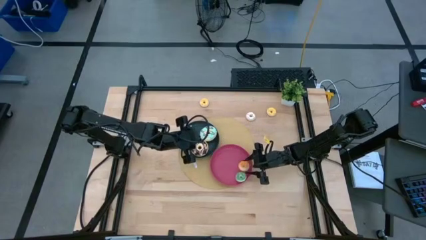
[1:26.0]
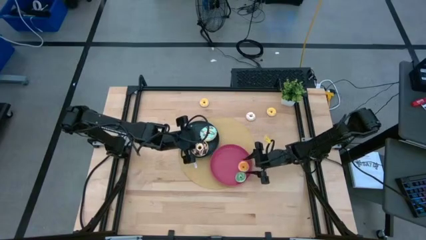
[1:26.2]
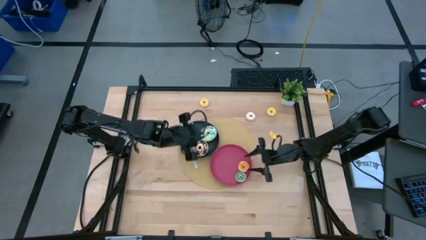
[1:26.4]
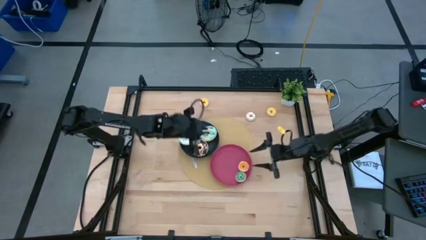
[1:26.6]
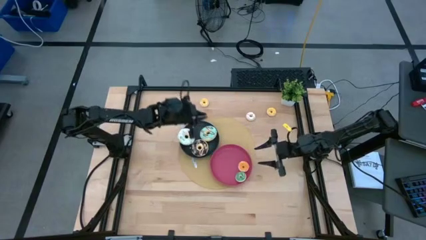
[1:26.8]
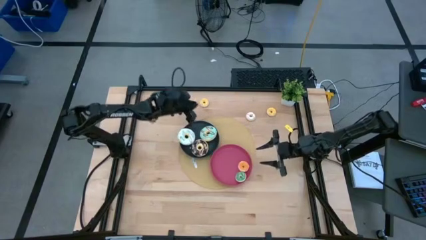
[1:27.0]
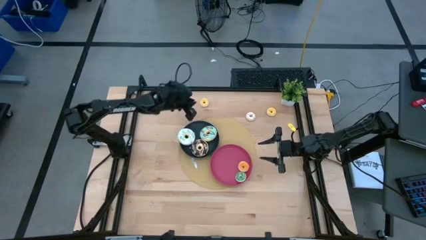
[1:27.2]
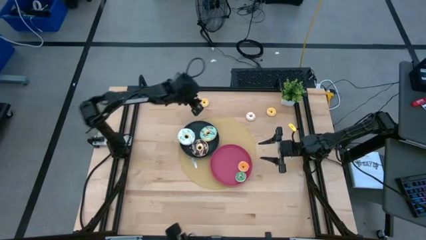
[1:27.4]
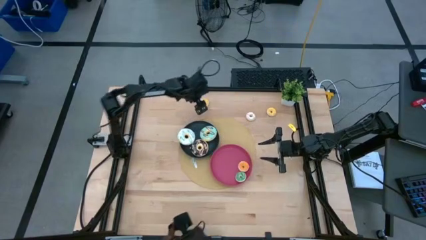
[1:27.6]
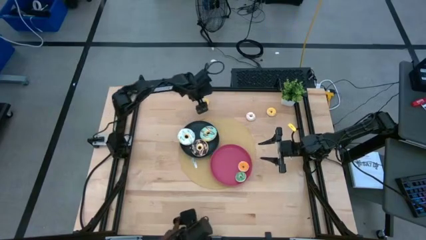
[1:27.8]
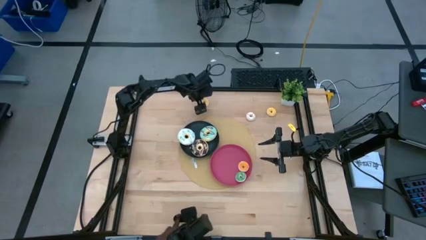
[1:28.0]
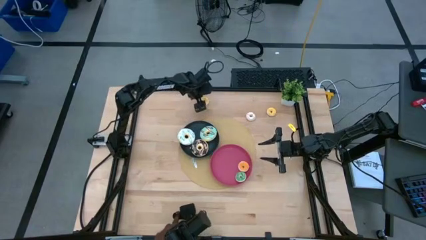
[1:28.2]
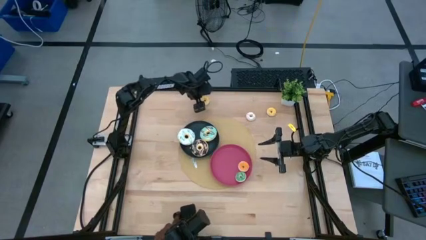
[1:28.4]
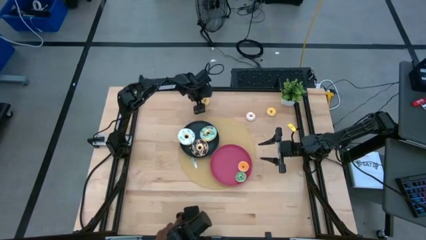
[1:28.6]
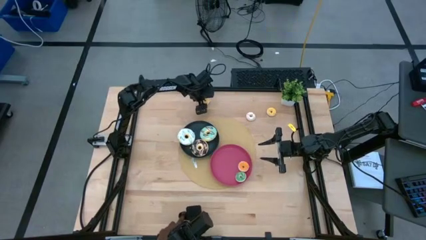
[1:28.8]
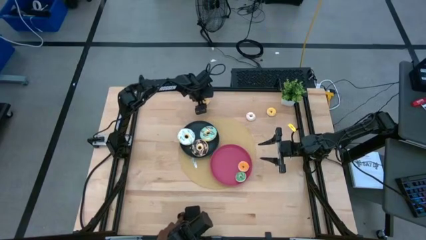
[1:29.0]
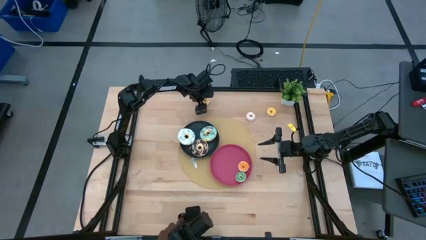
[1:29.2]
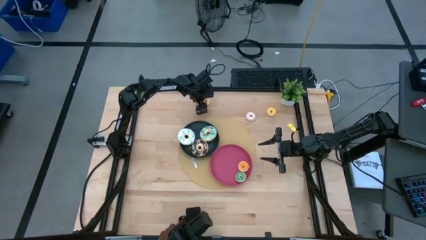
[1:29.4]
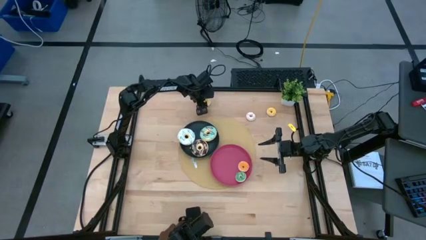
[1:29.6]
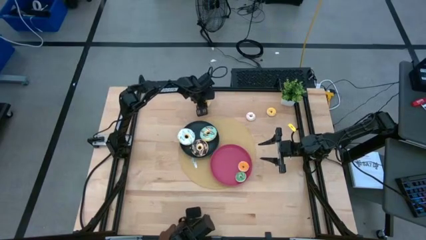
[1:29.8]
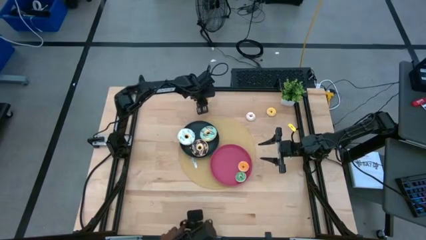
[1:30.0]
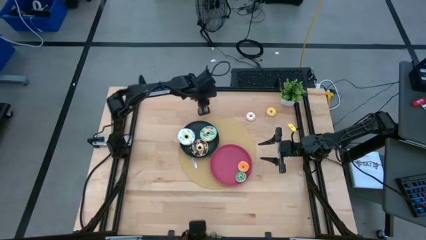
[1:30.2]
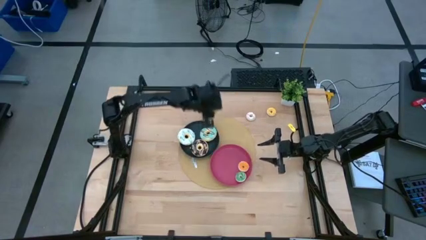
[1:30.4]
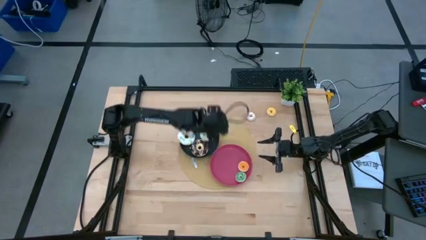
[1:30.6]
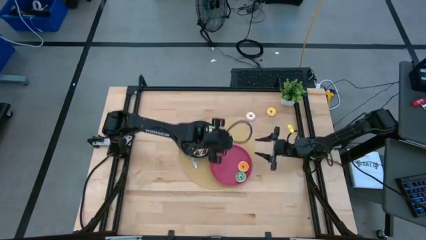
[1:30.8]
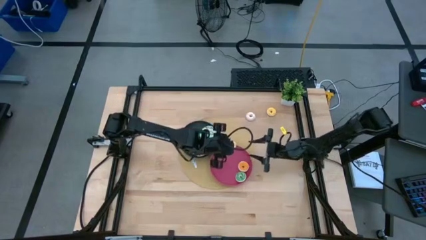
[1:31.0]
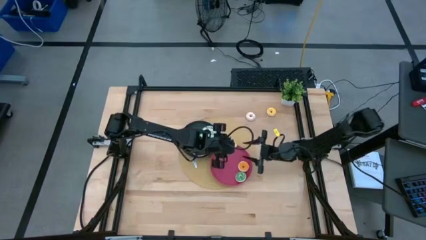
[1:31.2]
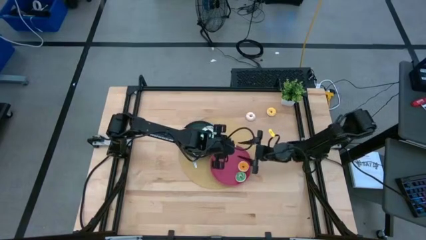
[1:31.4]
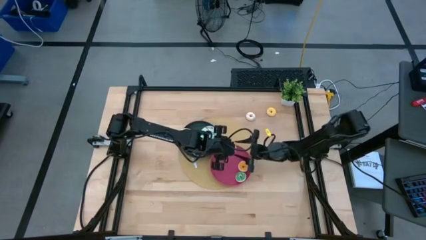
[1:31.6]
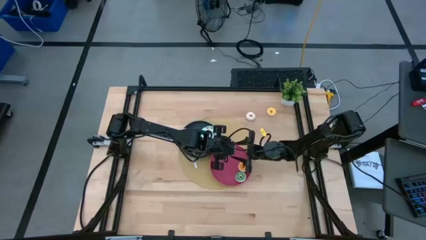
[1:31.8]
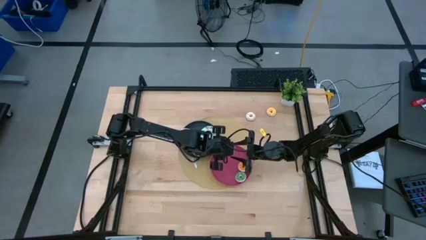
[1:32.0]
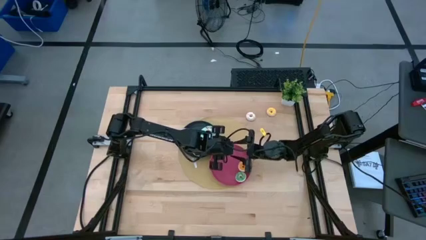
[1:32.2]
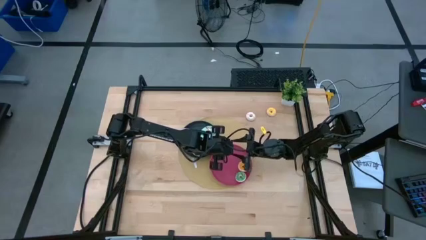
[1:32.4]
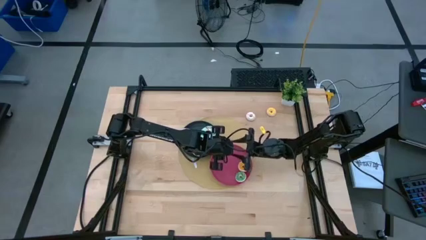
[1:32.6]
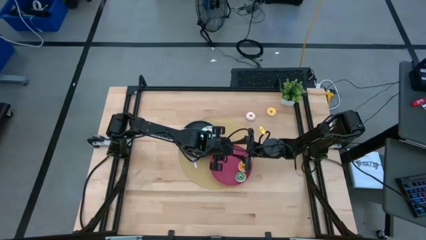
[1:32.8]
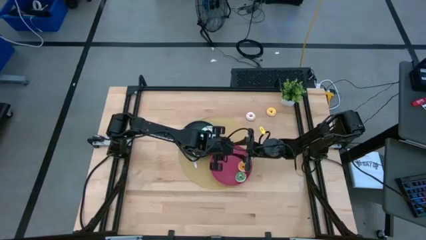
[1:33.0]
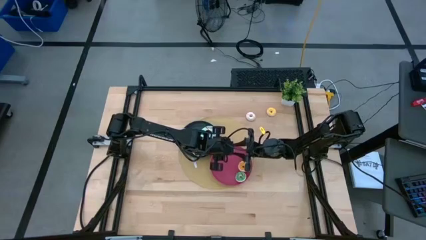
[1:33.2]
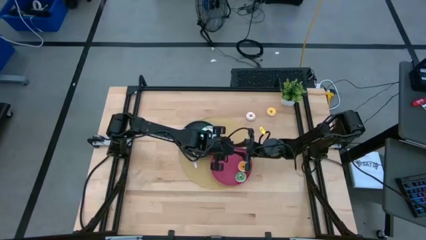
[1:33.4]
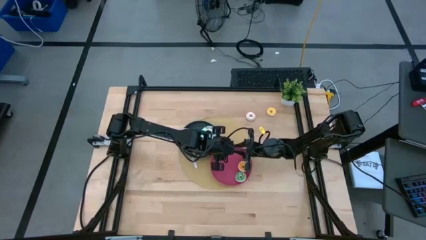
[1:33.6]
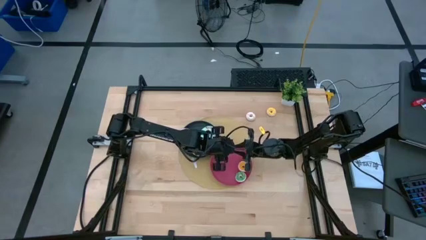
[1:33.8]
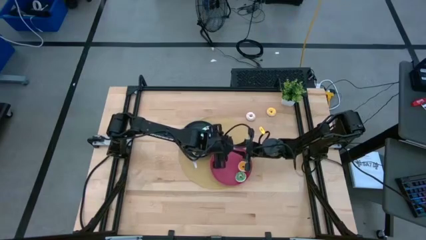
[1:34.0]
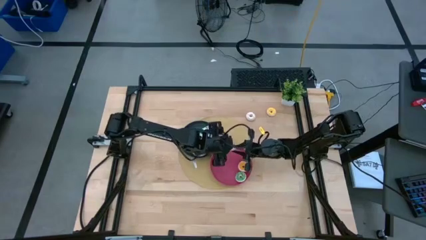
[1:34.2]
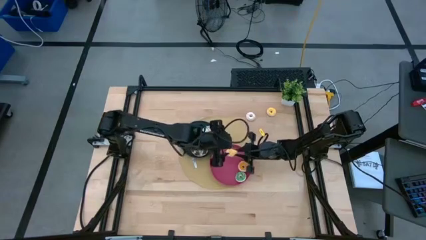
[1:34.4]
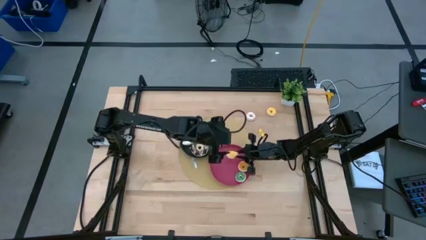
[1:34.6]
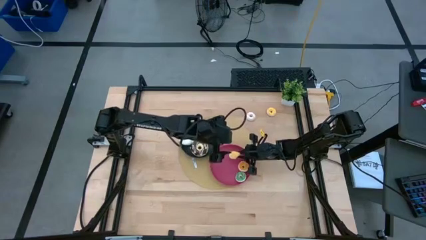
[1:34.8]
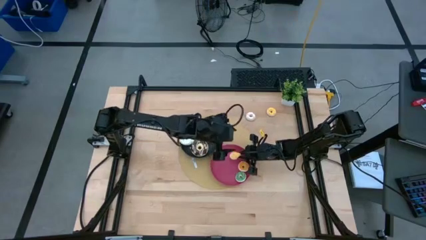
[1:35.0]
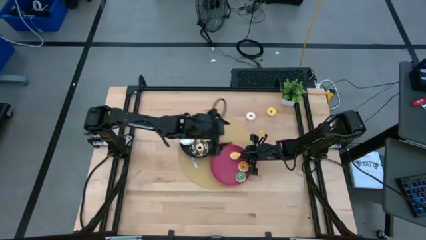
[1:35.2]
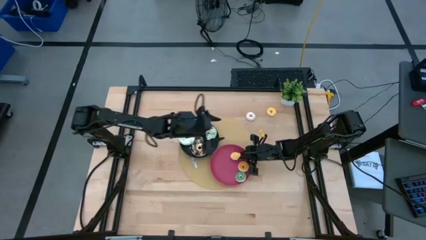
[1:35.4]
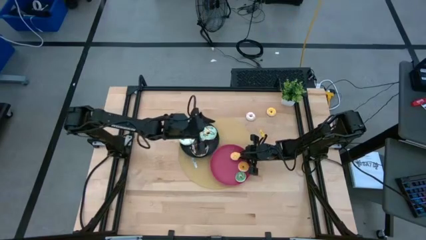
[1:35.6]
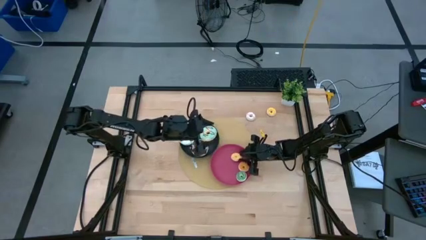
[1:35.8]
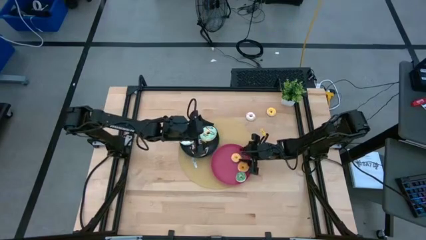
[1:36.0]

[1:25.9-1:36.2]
Task: Pick & Place donuts
Put the left small yellow donut on the pink plate

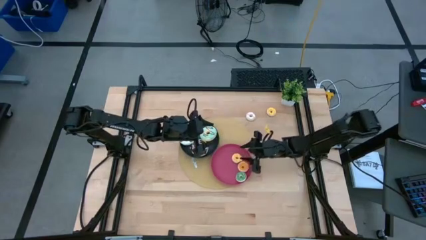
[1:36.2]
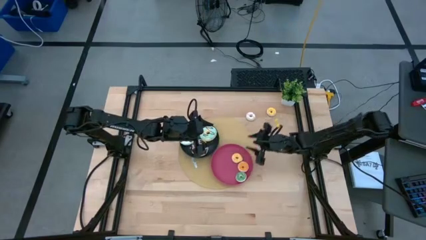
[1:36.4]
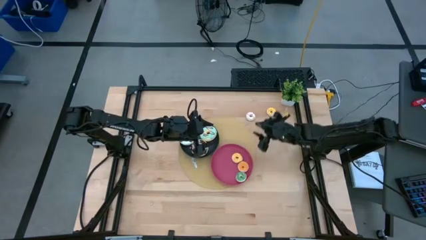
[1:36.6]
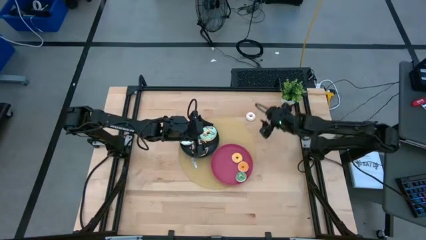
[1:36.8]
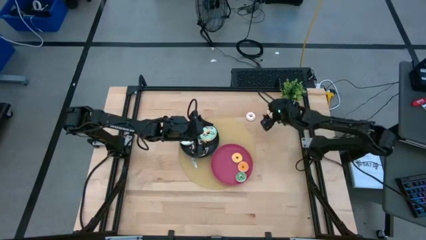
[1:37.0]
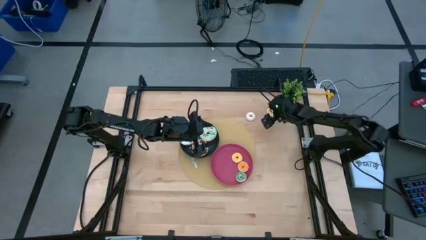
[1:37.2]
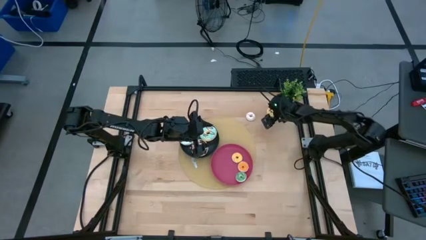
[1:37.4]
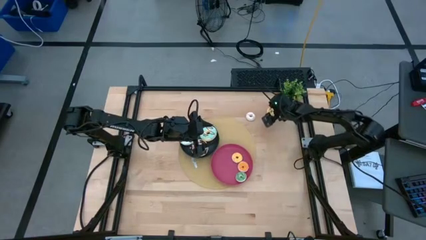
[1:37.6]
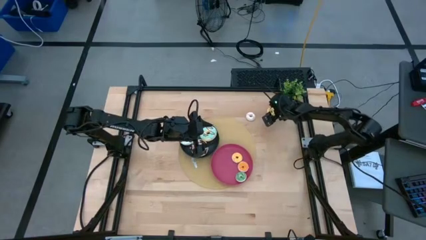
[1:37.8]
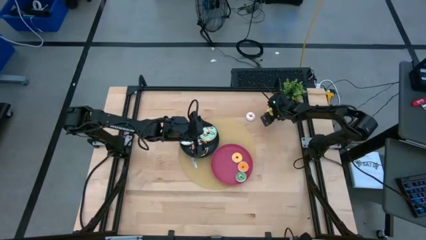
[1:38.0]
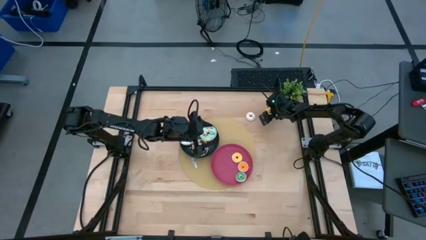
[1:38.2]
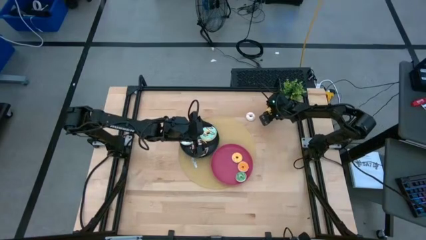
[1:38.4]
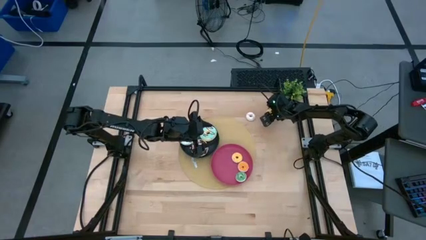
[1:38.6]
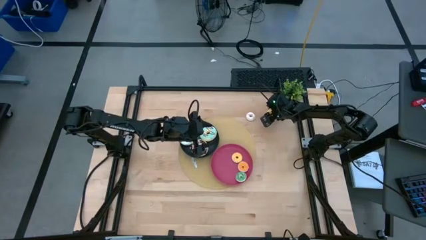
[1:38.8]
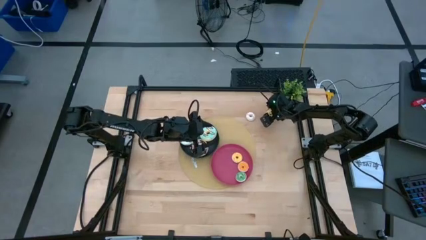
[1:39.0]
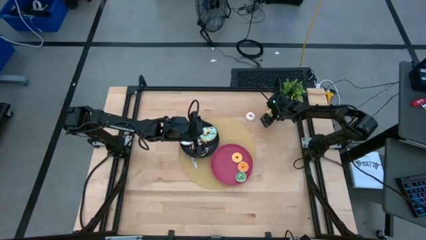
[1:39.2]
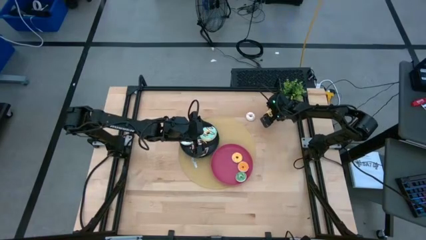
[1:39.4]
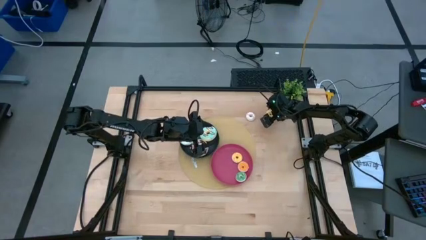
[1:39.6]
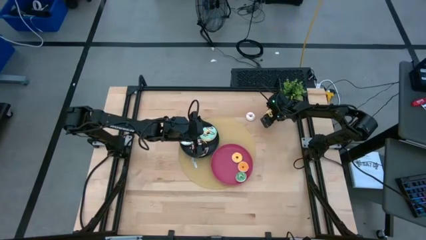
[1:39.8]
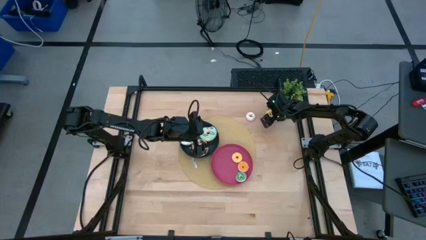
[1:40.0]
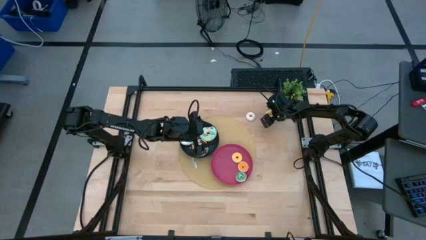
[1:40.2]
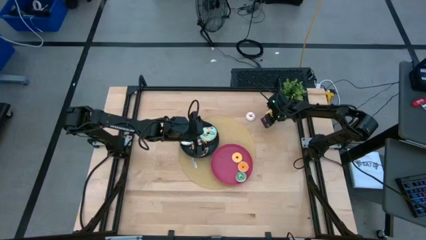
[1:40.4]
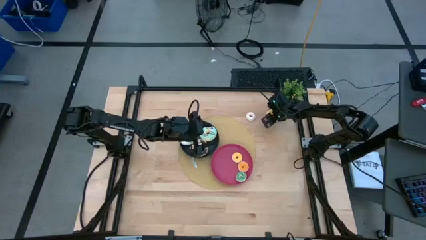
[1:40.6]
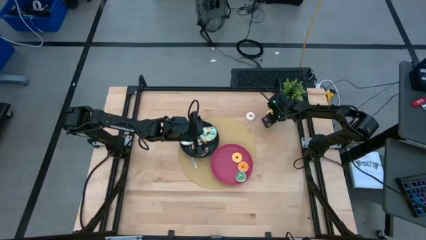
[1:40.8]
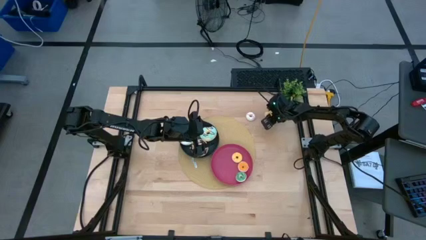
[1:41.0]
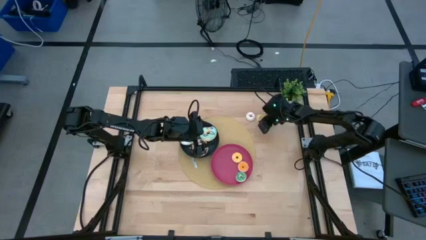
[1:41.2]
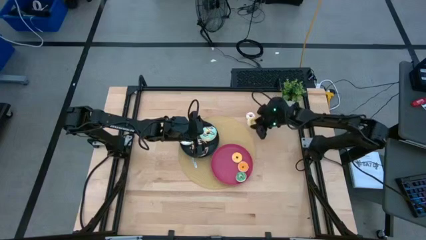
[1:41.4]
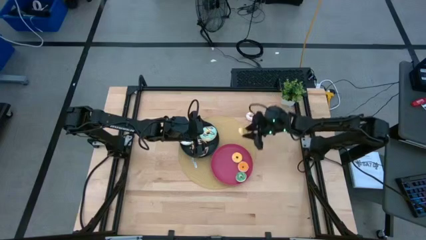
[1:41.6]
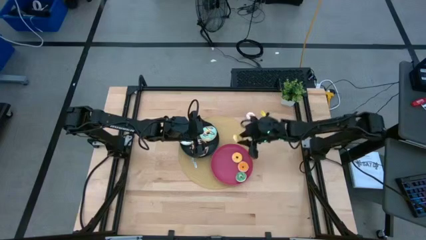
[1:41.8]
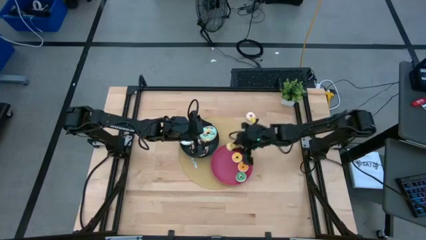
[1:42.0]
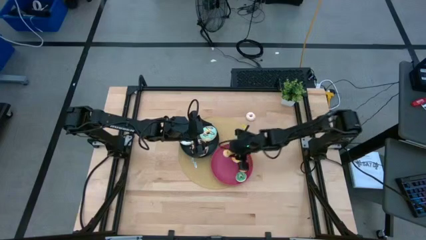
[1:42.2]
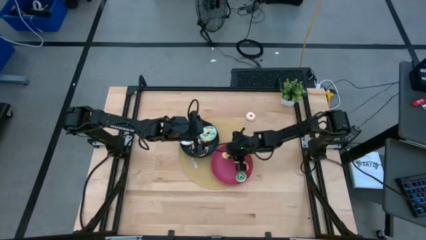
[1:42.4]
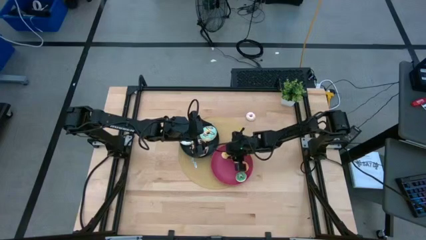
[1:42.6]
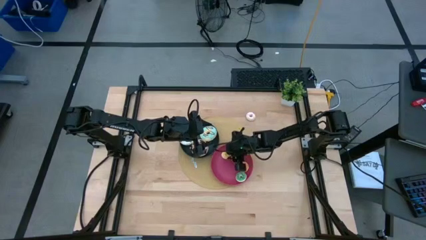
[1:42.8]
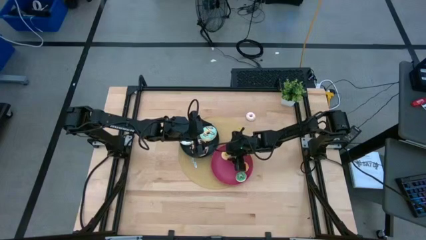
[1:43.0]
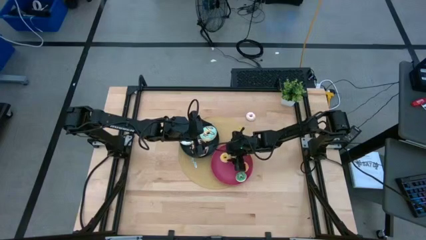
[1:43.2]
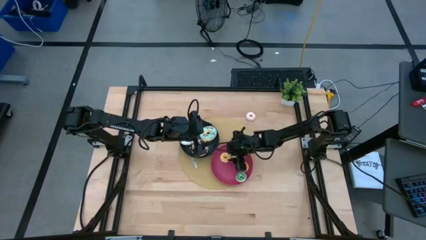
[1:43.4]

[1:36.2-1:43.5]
Put the small yellow donut on the pink plate
